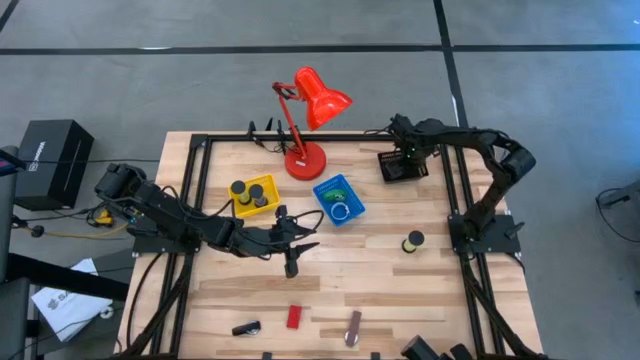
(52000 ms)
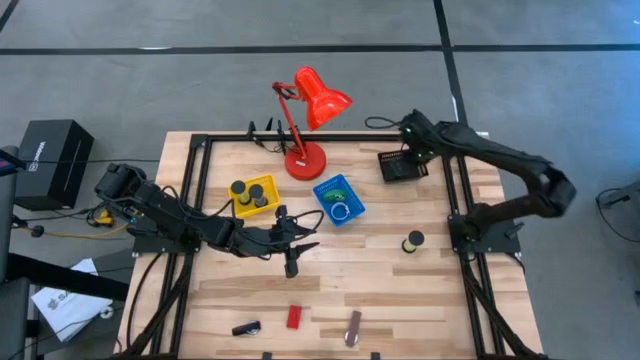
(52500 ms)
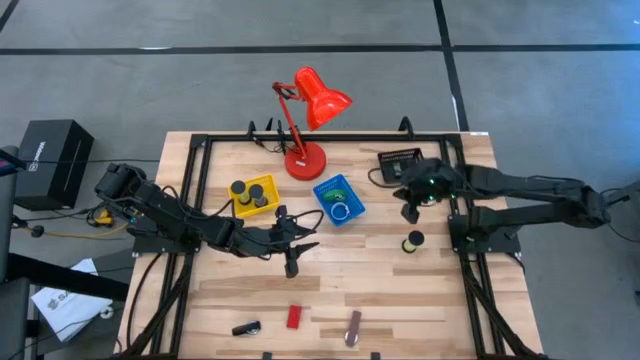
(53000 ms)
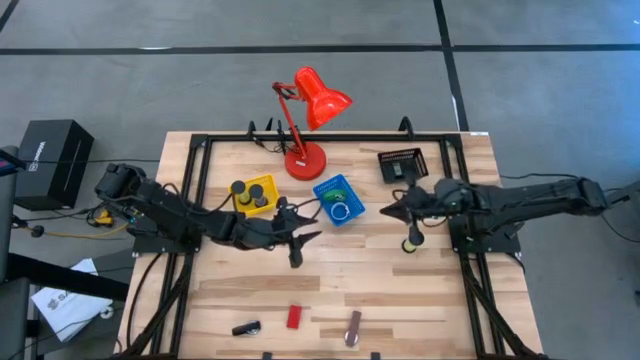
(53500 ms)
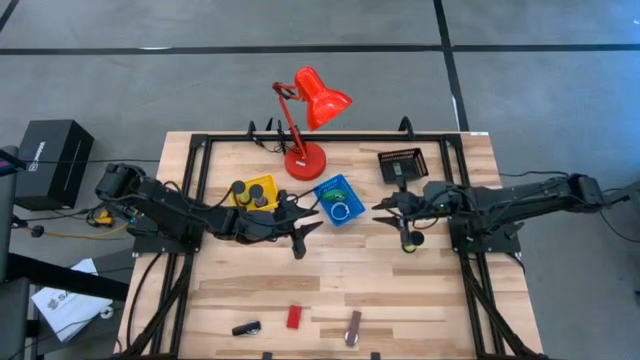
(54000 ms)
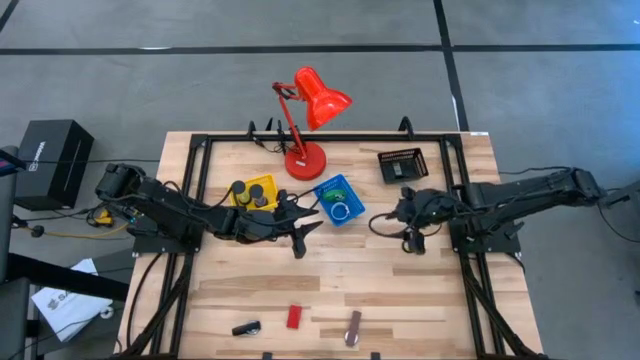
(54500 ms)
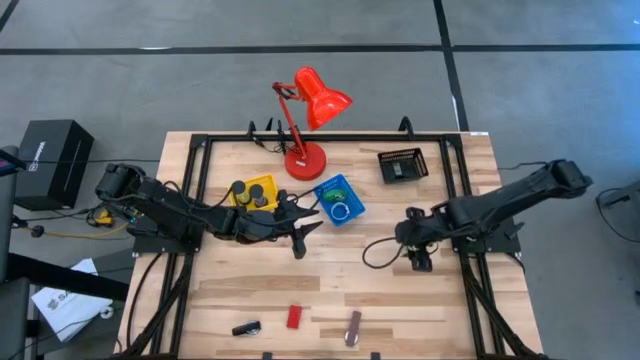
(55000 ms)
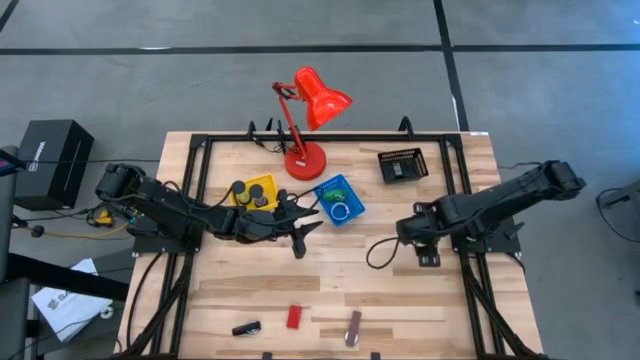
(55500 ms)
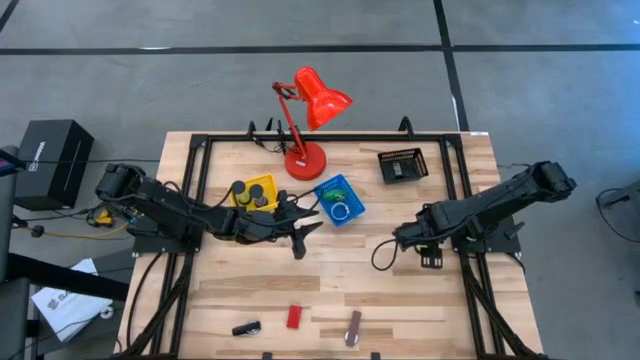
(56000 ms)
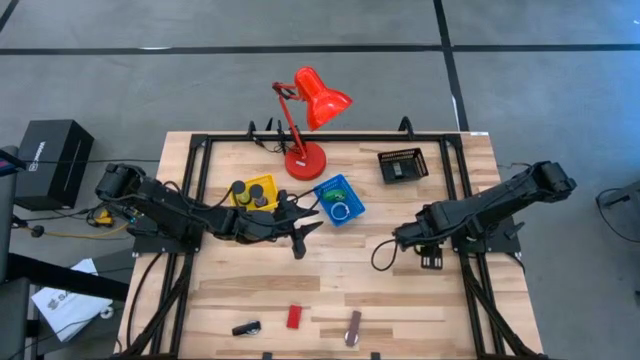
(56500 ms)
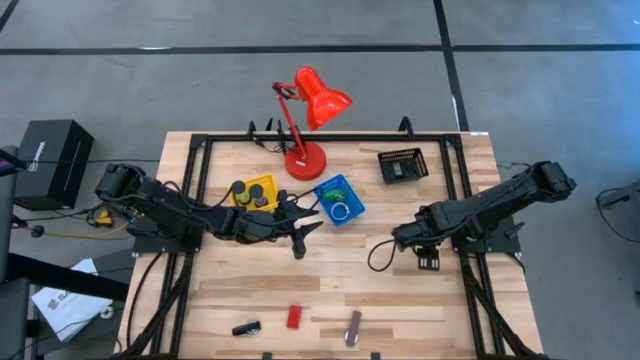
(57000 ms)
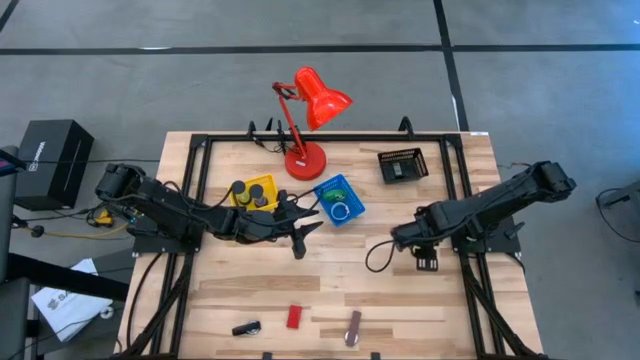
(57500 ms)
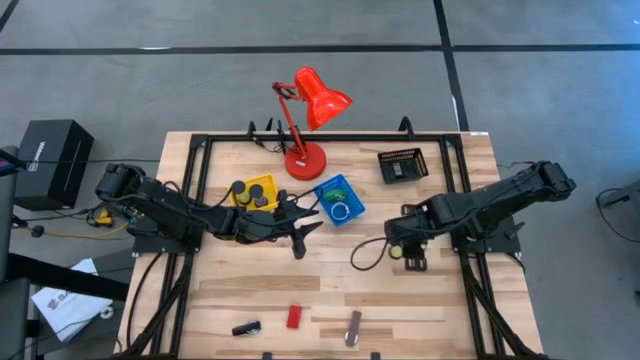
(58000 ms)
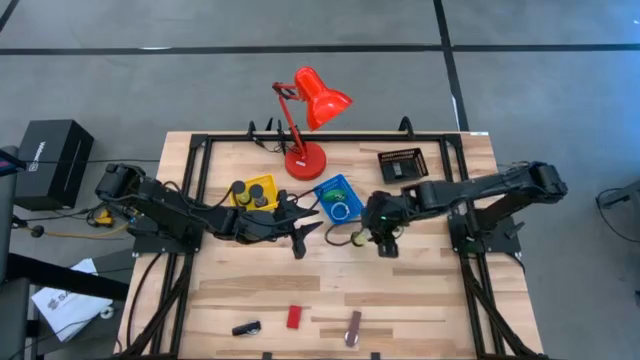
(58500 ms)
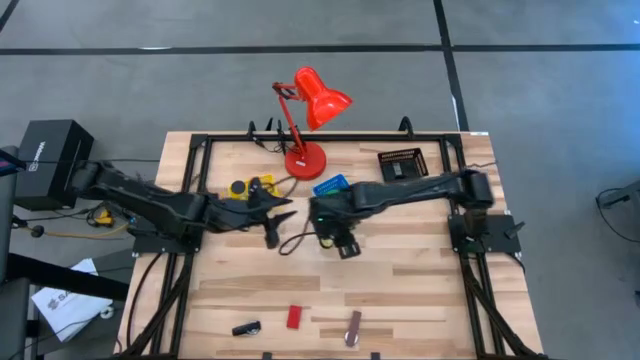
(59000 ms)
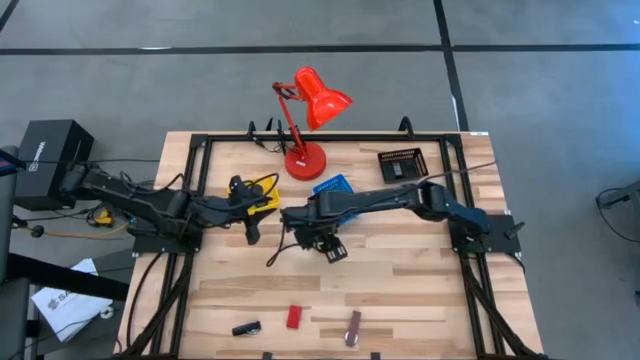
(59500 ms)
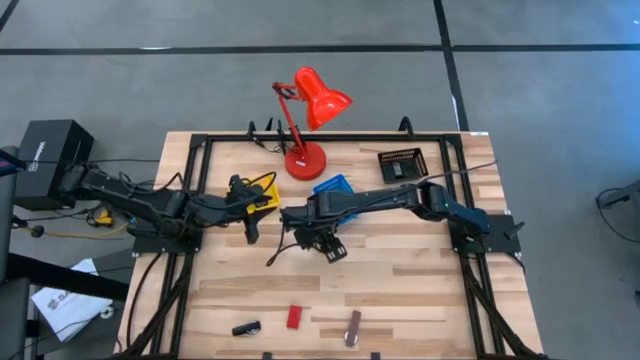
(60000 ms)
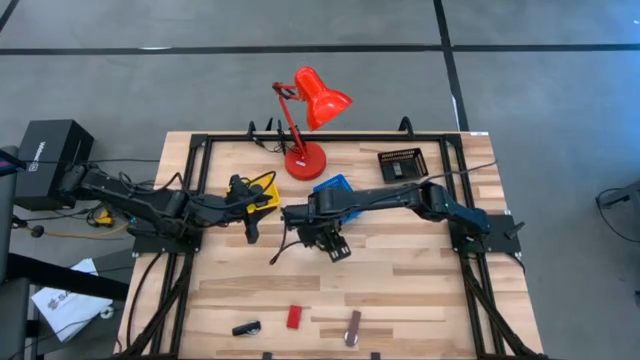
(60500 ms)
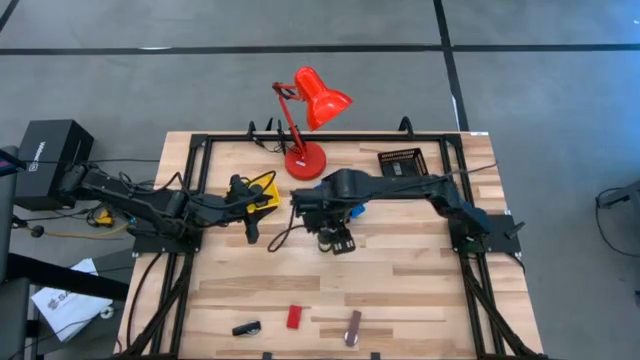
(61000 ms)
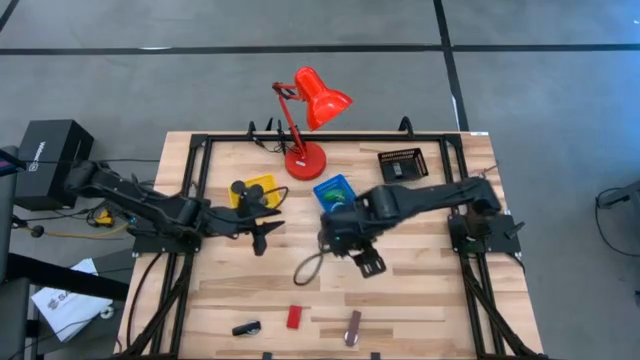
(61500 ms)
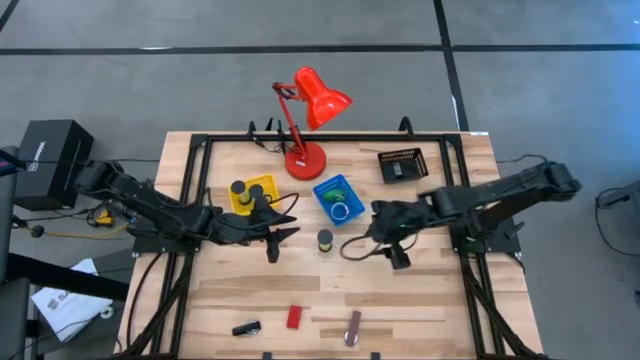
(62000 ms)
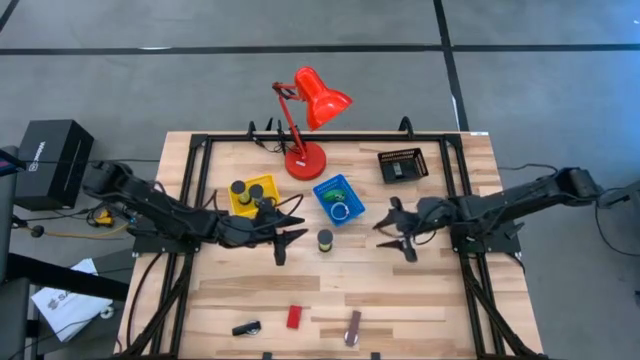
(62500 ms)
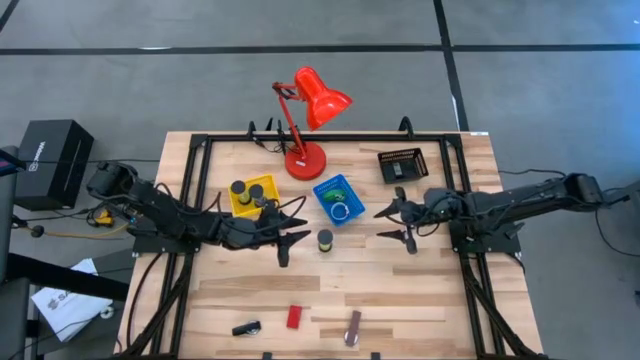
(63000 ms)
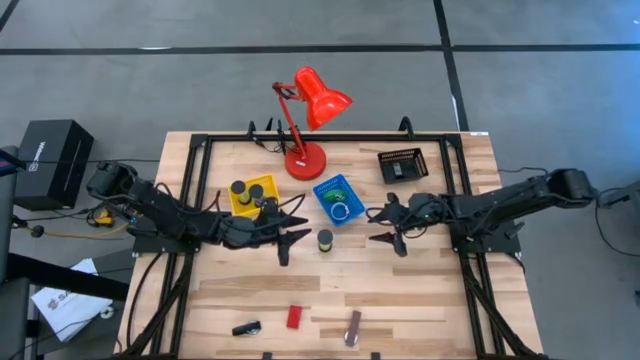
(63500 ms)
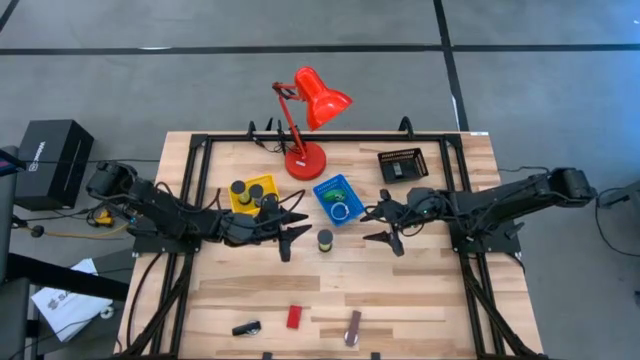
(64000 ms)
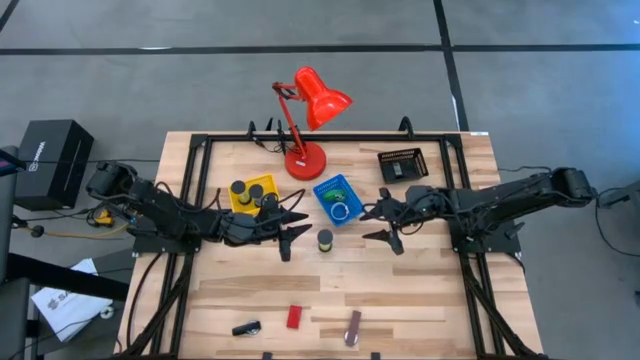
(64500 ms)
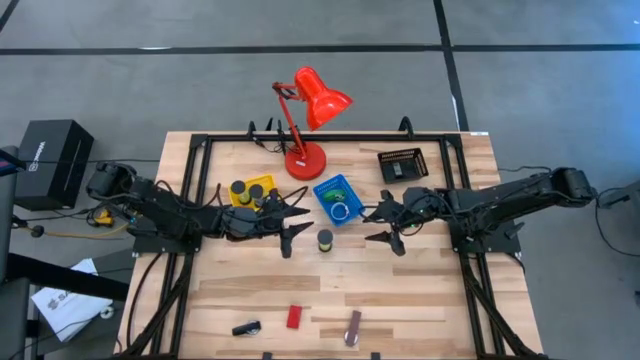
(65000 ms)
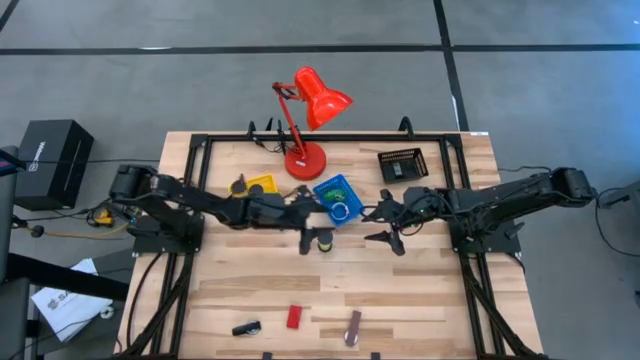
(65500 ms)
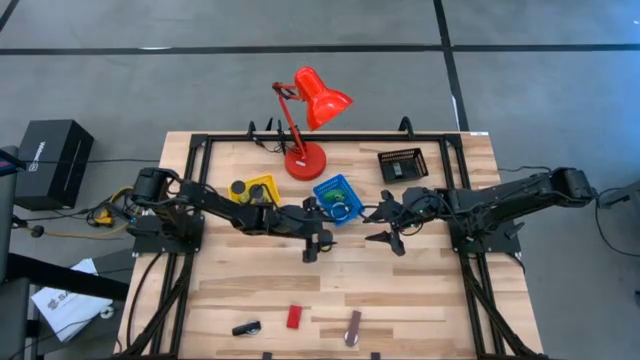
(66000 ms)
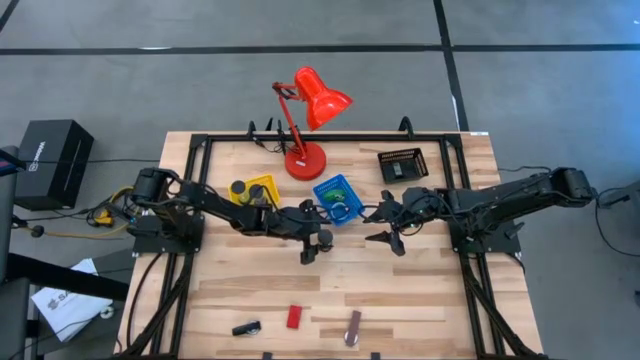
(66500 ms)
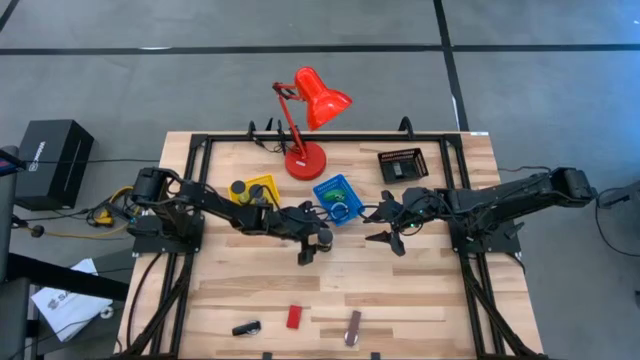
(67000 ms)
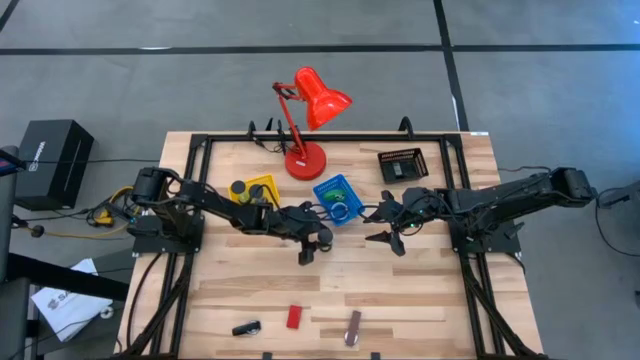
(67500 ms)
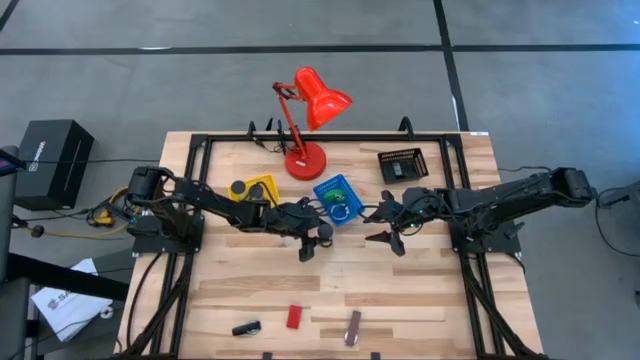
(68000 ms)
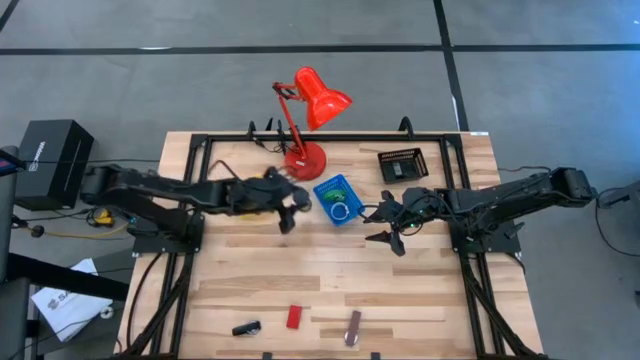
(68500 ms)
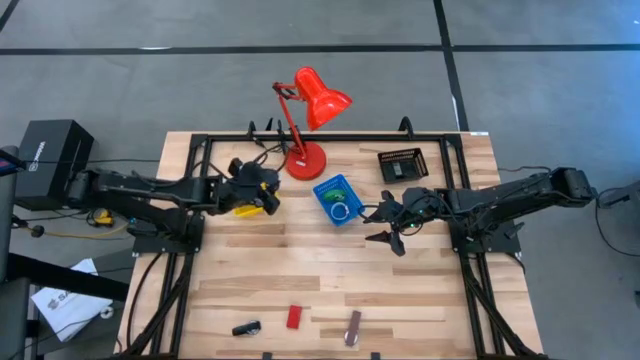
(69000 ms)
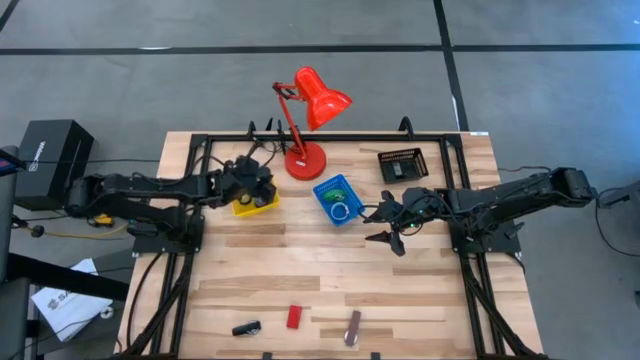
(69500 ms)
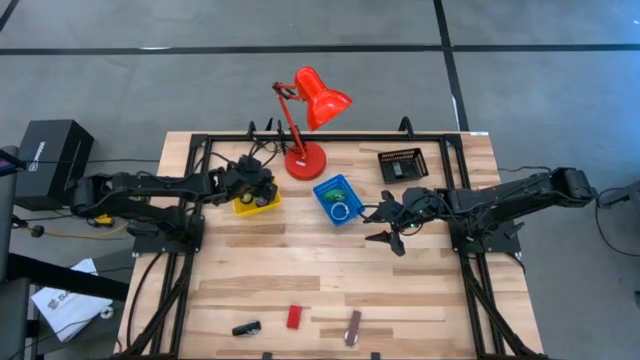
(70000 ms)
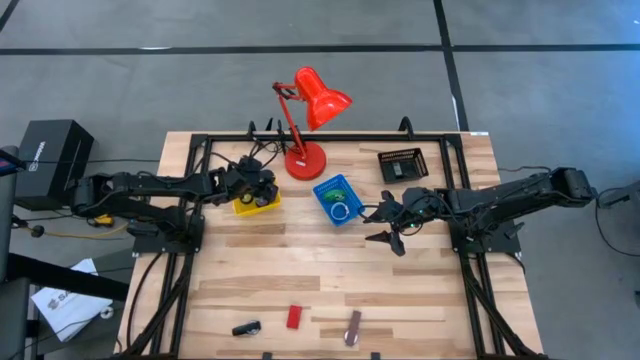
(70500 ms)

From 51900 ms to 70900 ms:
Task: Pick & Place Office items
Put the light green hourglass into the yellow bin

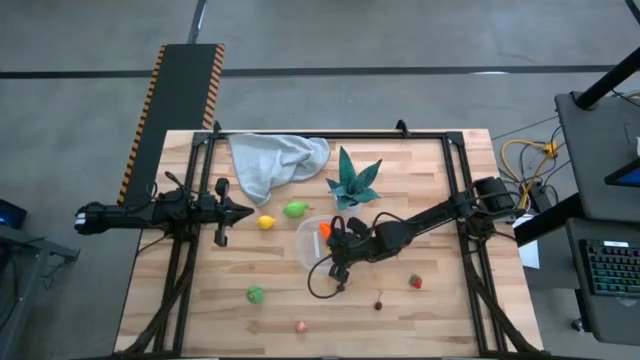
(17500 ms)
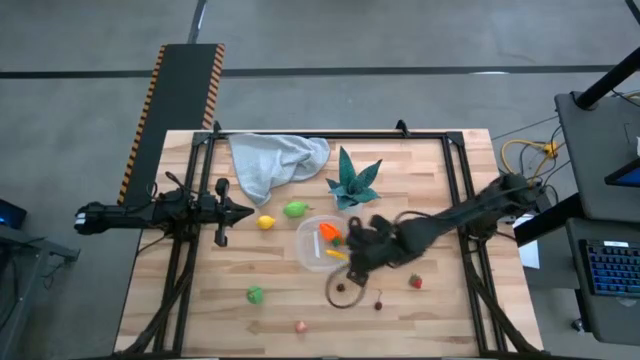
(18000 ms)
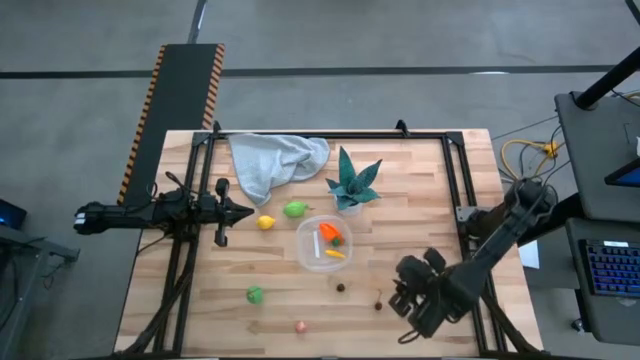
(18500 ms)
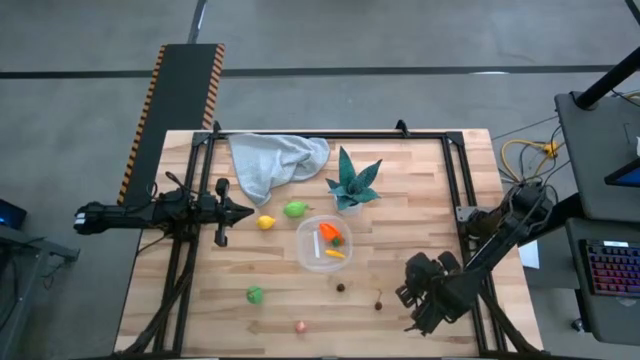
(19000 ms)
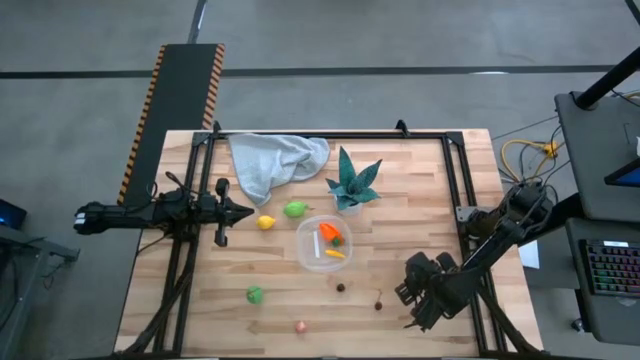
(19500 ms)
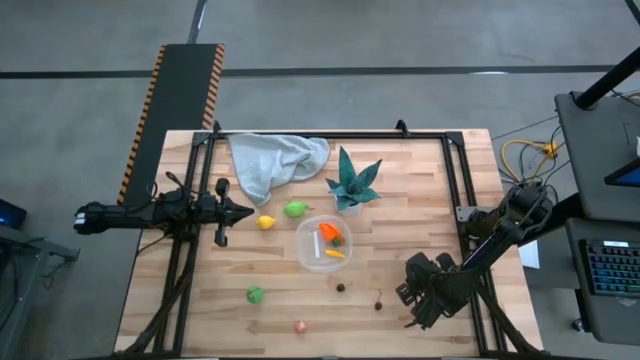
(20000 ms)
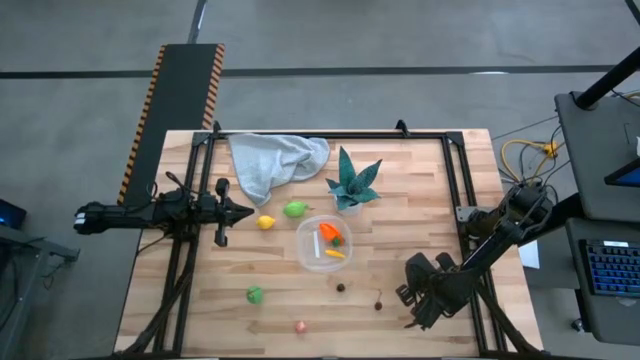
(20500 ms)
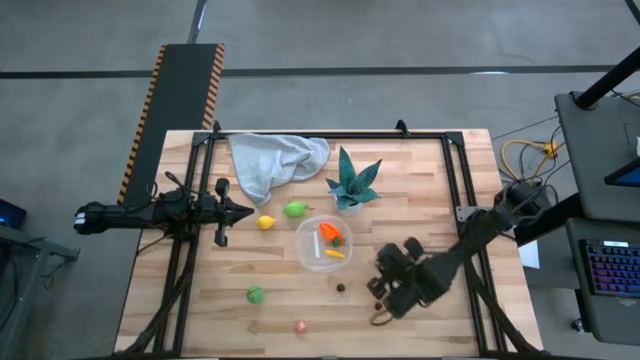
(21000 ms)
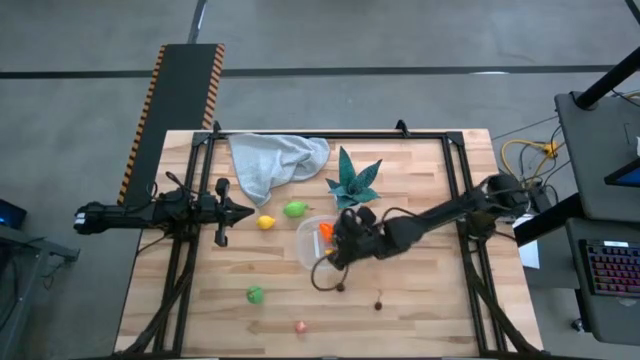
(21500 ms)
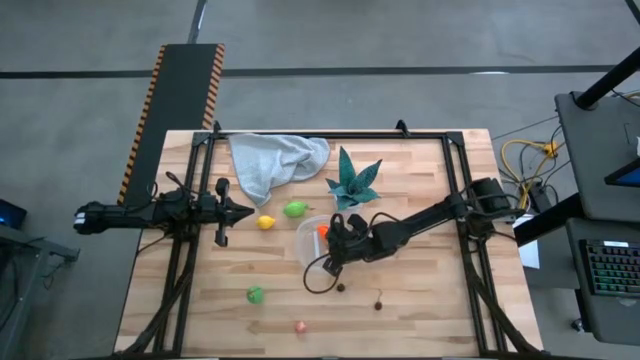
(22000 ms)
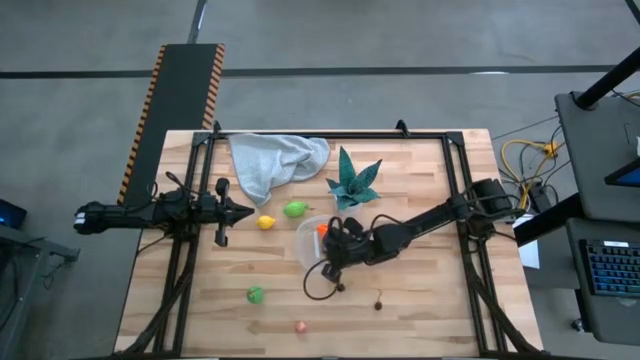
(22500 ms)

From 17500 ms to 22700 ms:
Task: Pick and placing Produce into tupperware
Put the strawberry into the transparent bin
